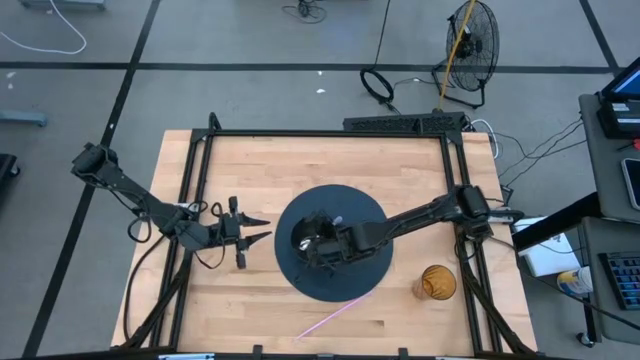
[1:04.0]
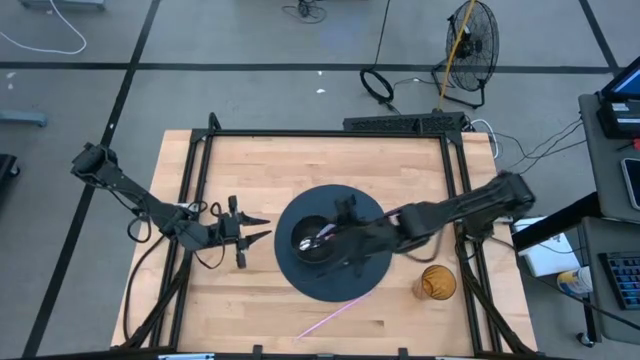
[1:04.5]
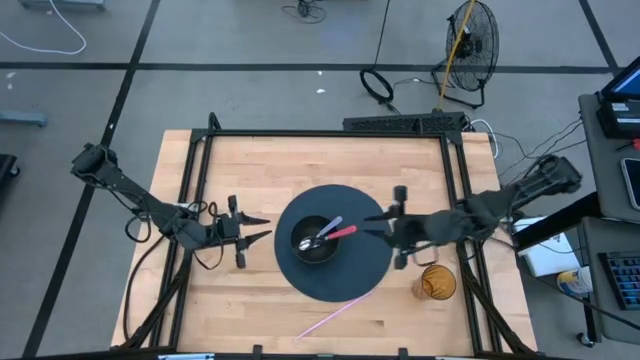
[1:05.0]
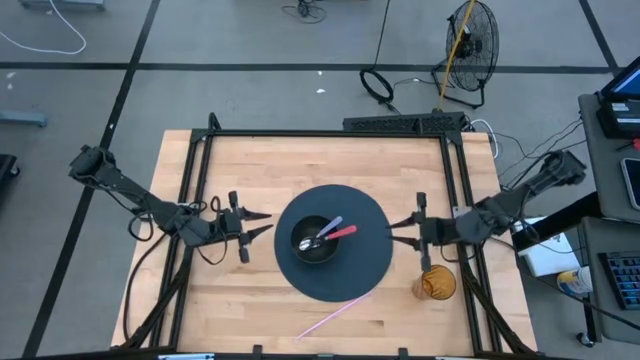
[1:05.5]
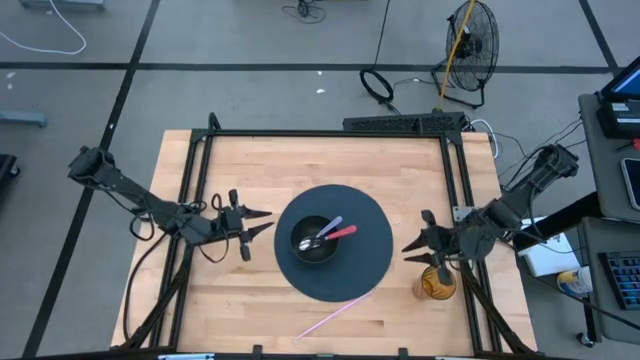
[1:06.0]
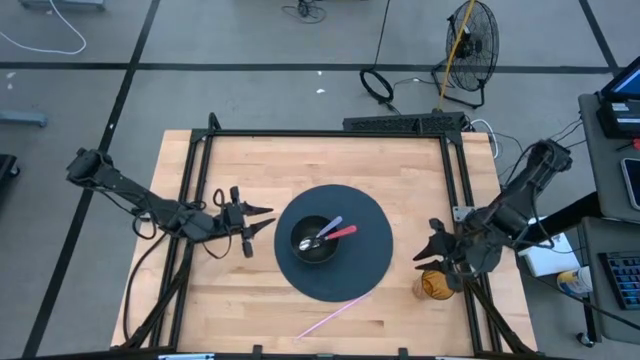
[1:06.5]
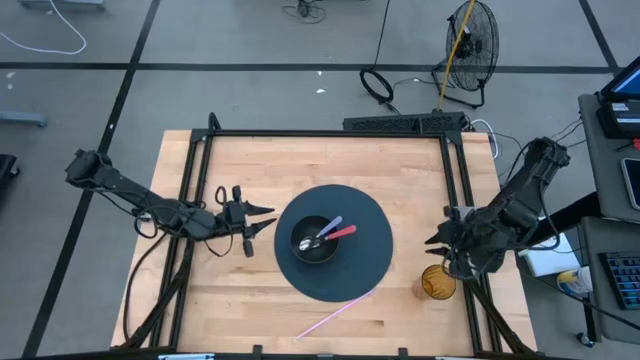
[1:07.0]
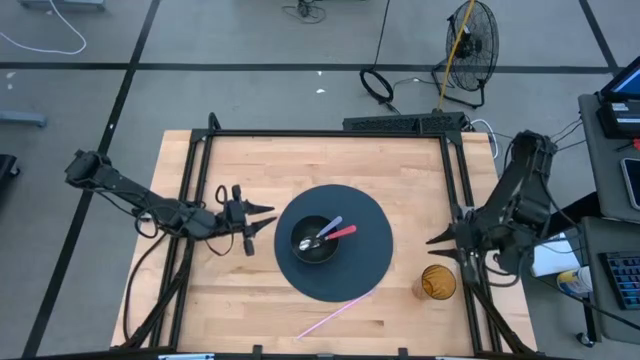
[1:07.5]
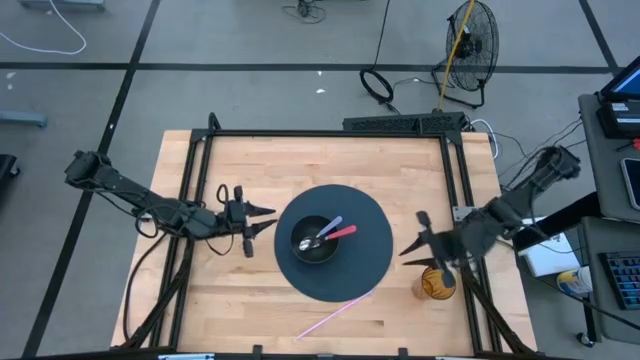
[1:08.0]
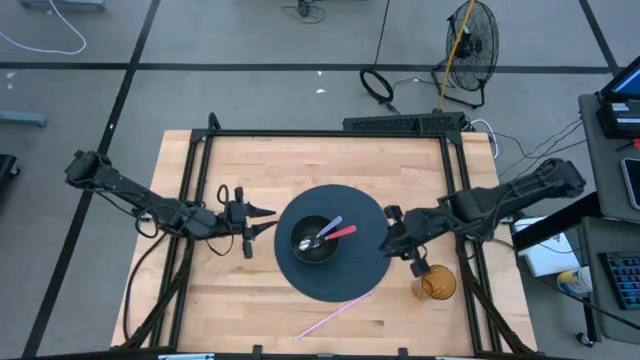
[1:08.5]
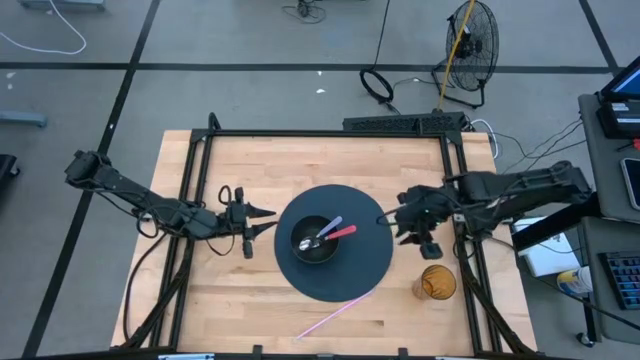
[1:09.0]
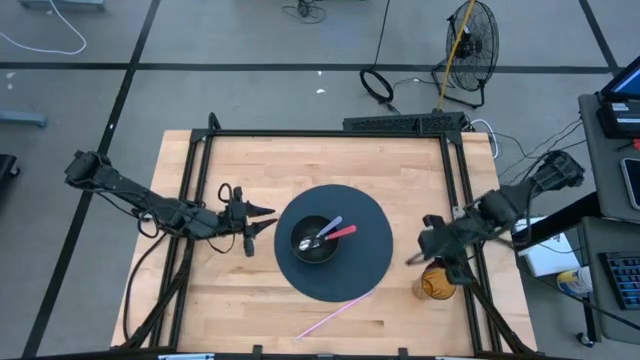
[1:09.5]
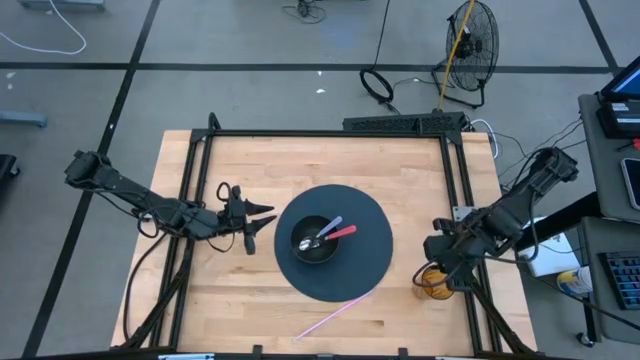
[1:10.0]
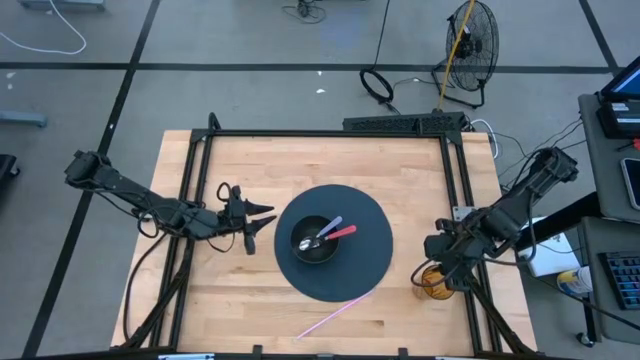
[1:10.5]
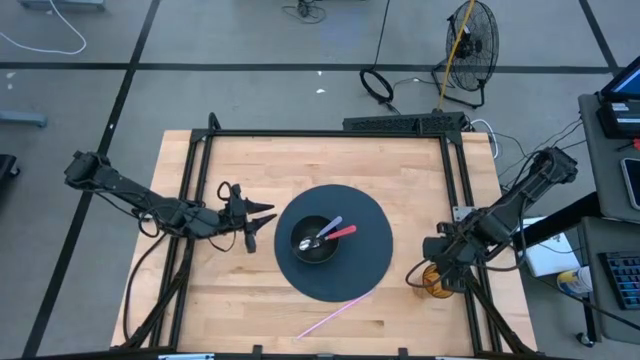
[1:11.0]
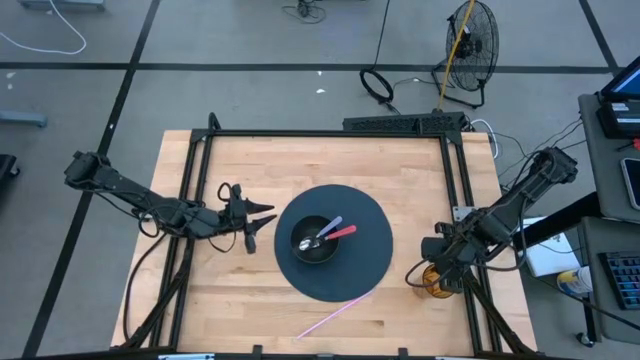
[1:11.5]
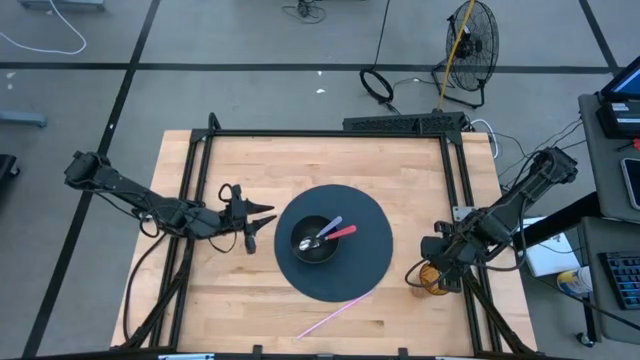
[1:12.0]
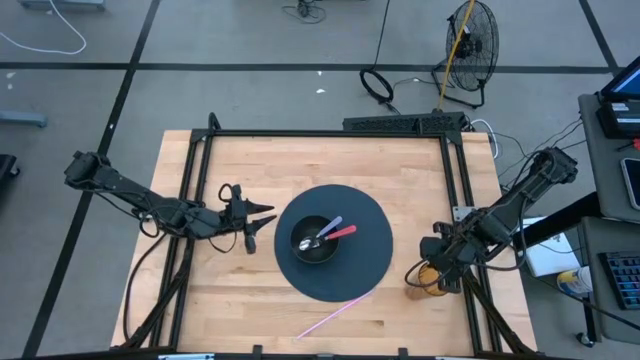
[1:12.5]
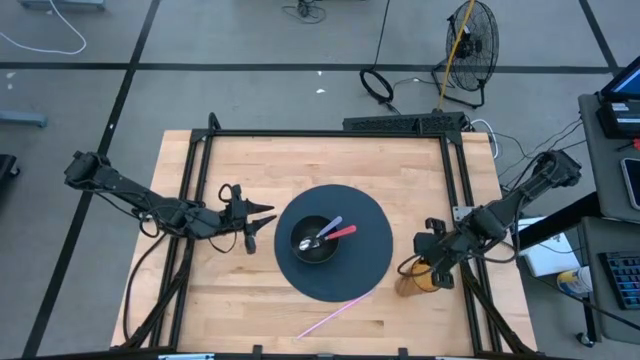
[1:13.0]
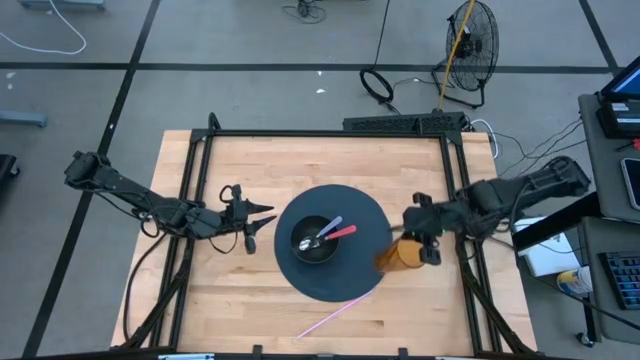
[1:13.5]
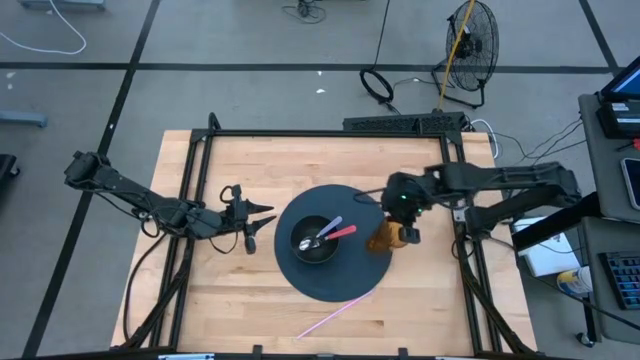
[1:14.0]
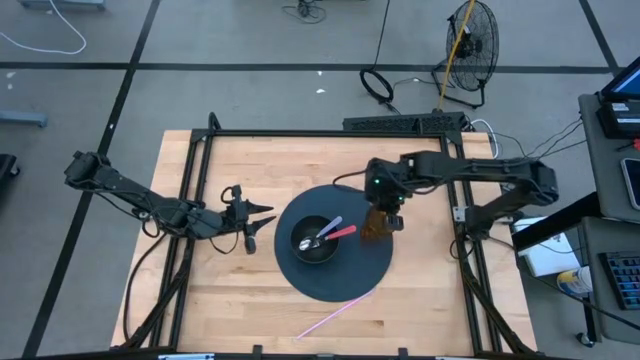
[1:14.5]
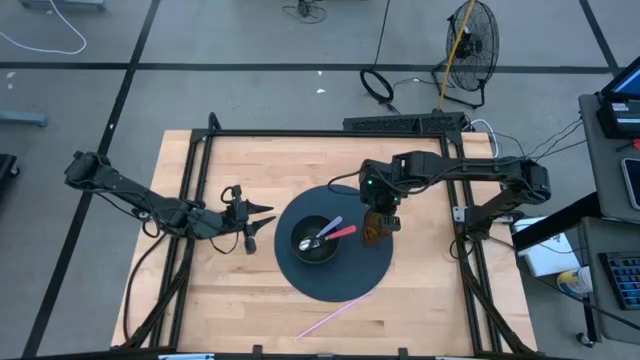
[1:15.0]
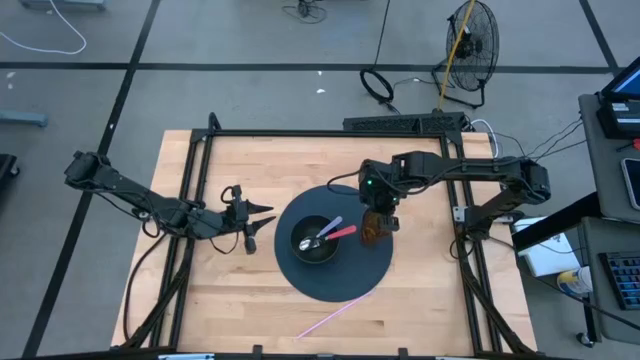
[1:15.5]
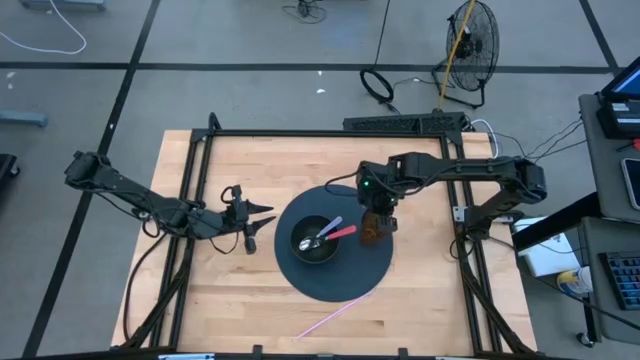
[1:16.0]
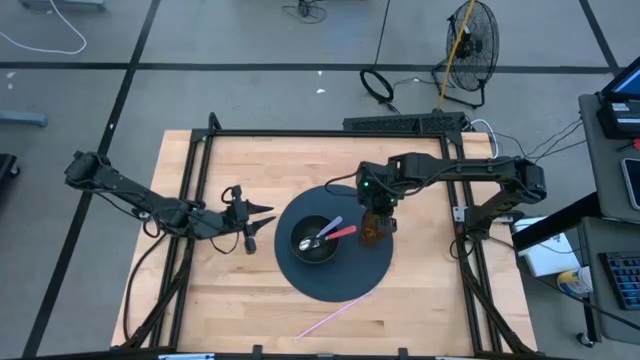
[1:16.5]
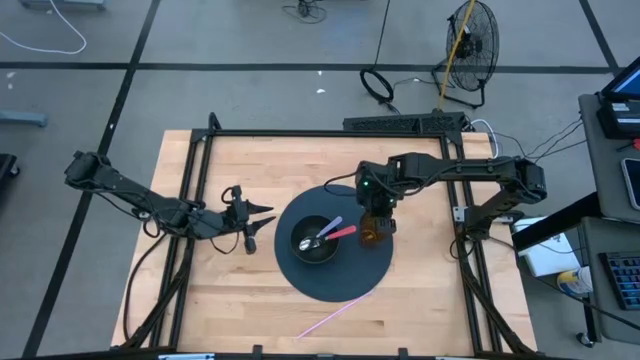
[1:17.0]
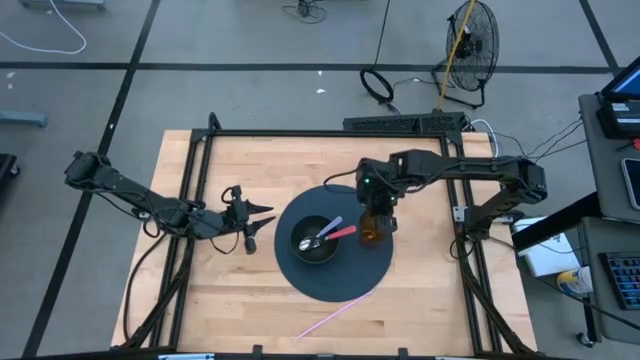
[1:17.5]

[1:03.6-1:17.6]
Task: Pick & Place Utensil
Put the brown cup on the blue mat to the right of the black bowl

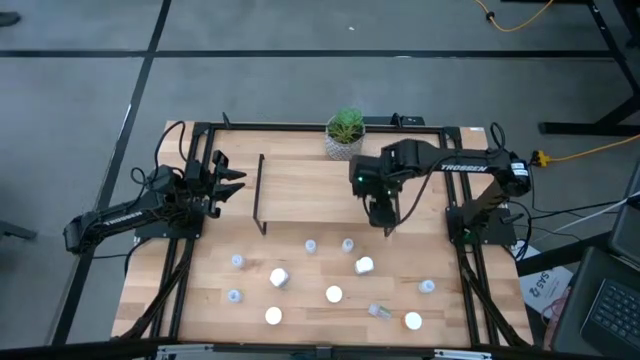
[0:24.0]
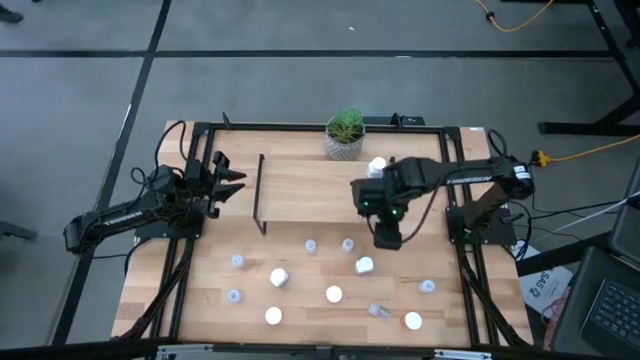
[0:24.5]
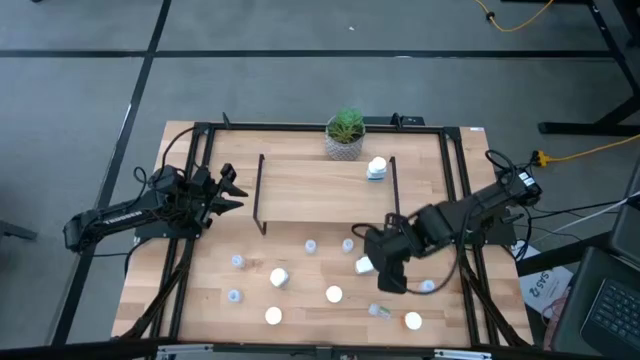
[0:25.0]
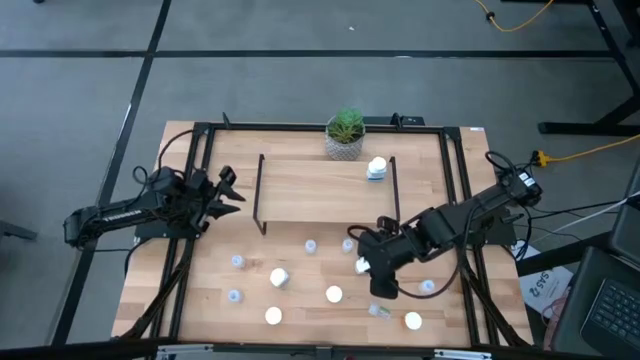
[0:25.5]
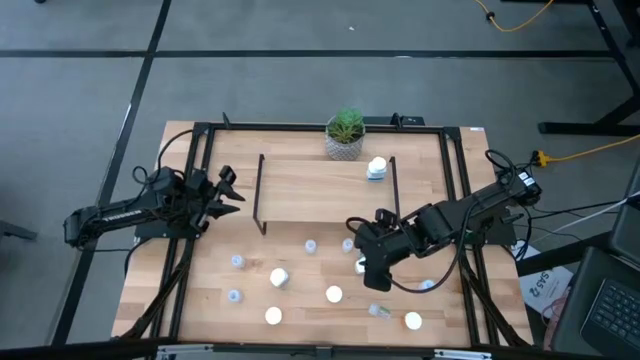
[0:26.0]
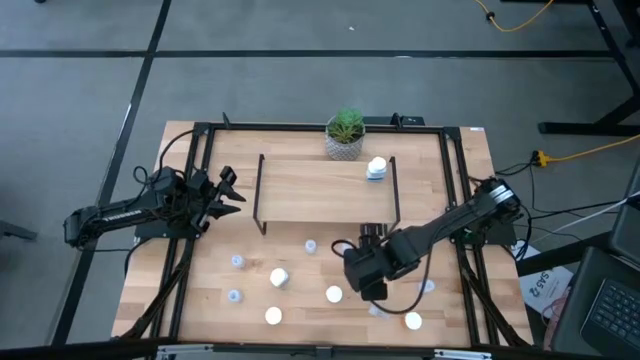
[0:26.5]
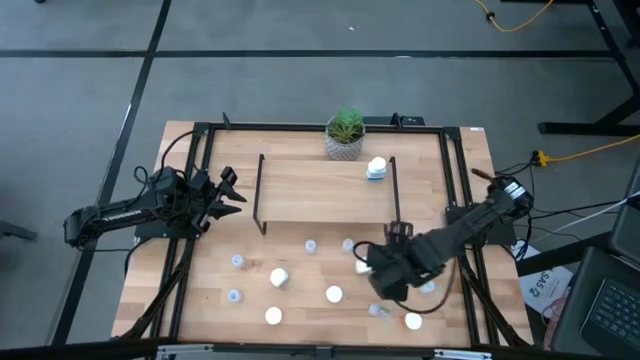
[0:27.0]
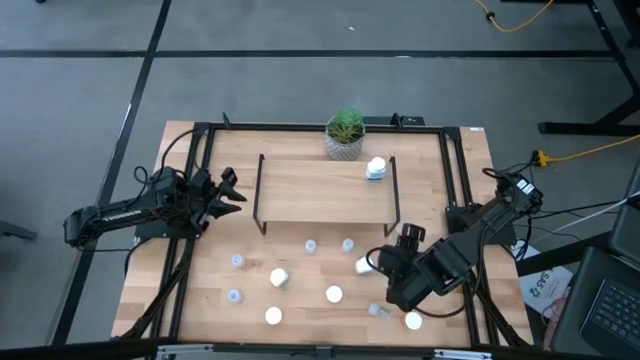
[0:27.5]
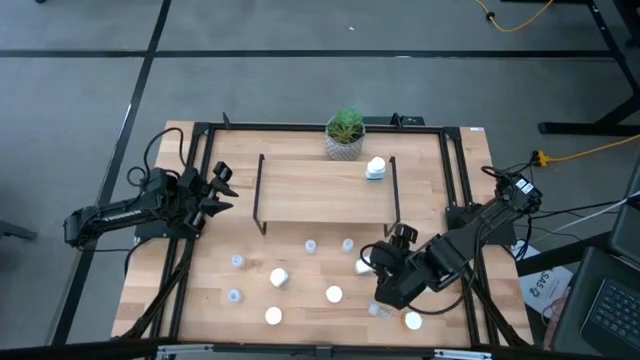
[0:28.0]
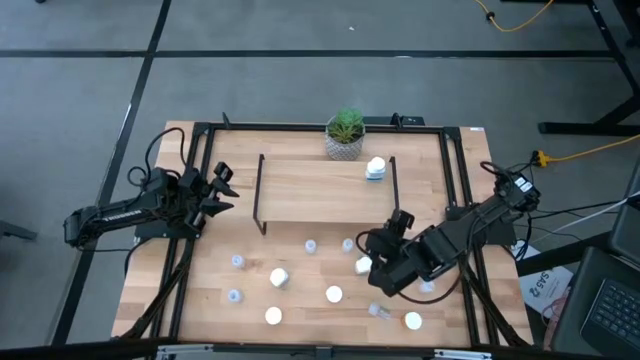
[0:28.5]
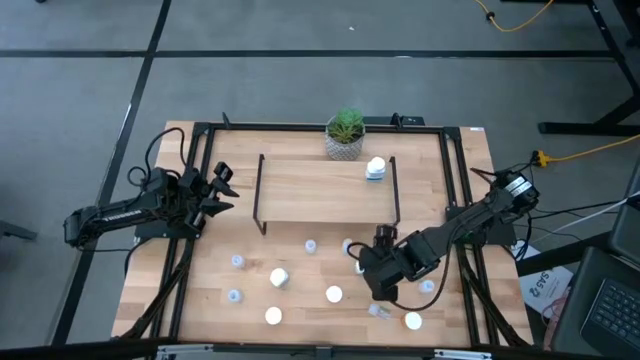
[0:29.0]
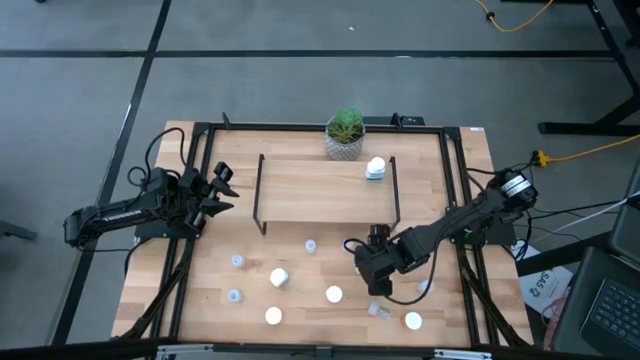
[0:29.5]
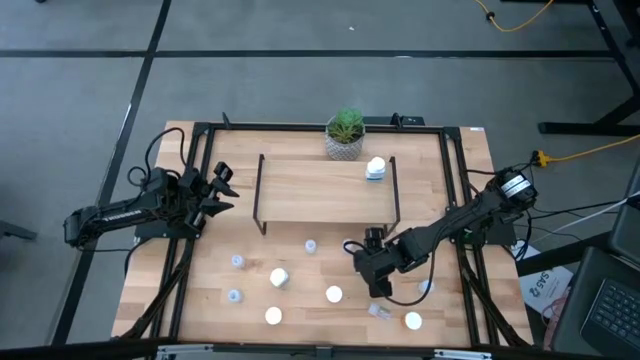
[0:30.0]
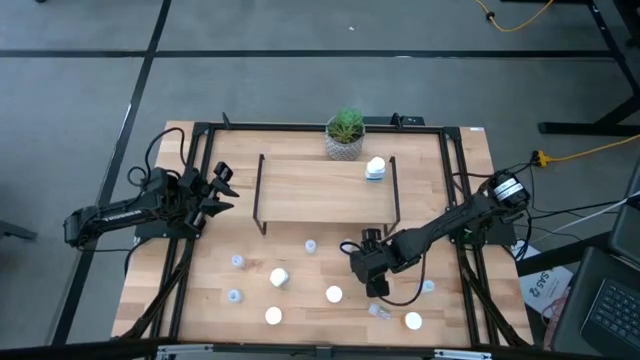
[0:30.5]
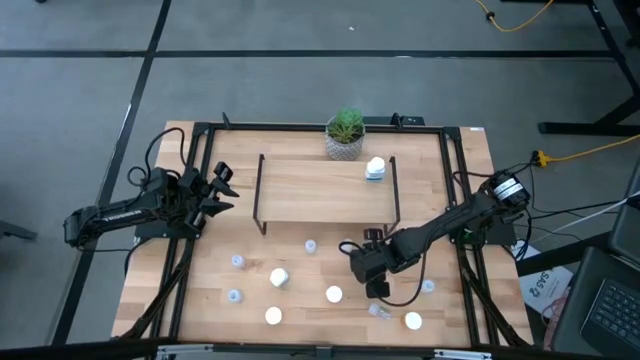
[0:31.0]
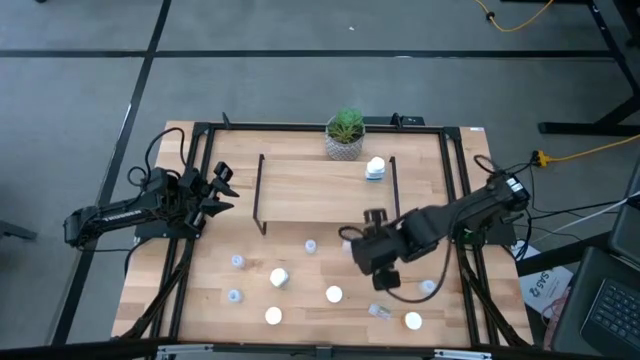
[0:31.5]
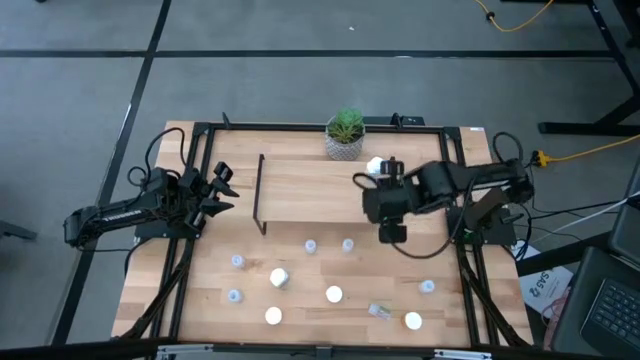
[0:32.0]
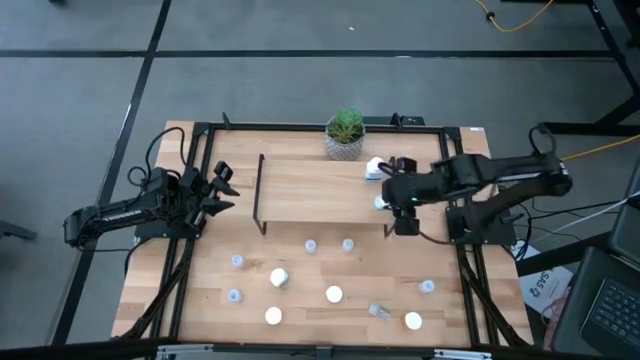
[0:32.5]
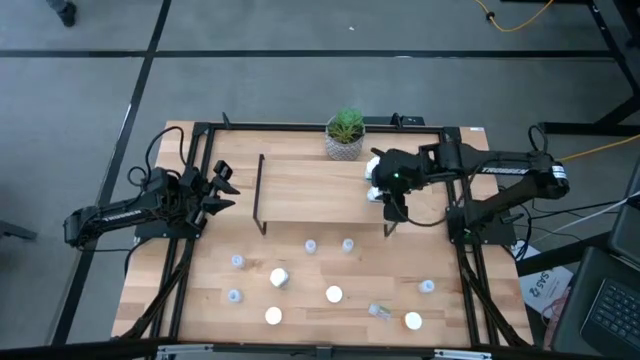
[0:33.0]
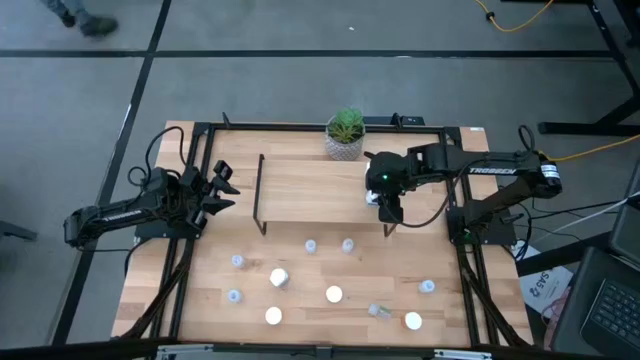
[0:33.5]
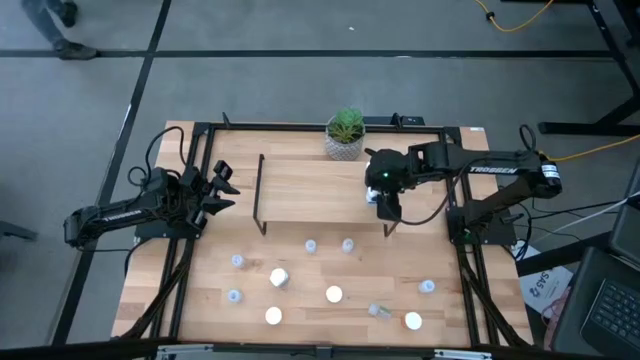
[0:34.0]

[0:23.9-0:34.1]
Task: Pick and place medicine bottles onto shelf by color
Put the right white medicine bottle on the shelf aligned with the other white medicine bottle
